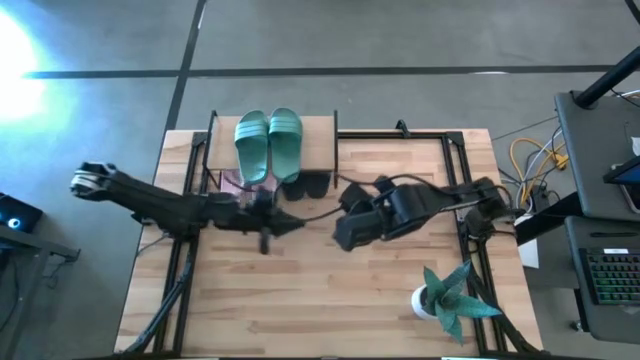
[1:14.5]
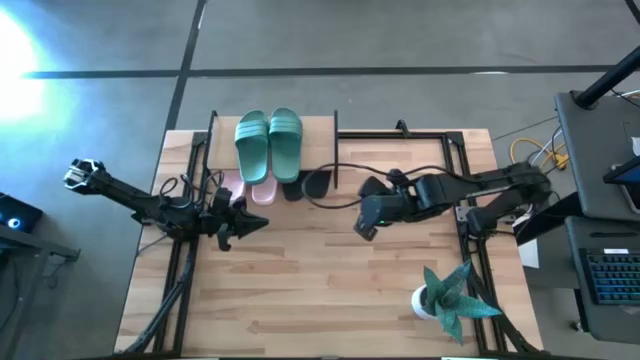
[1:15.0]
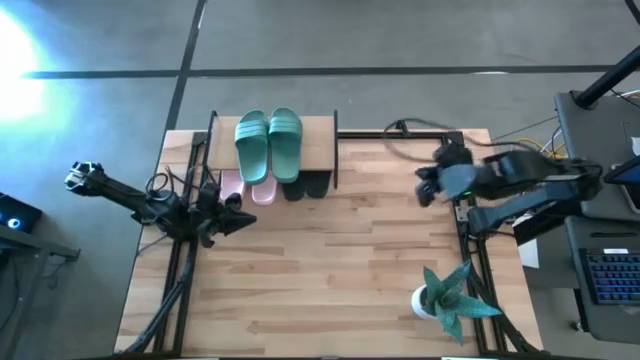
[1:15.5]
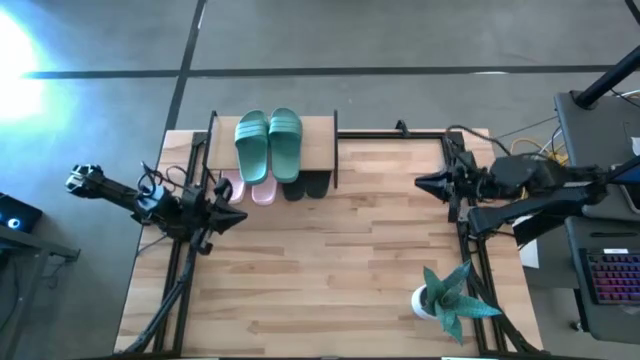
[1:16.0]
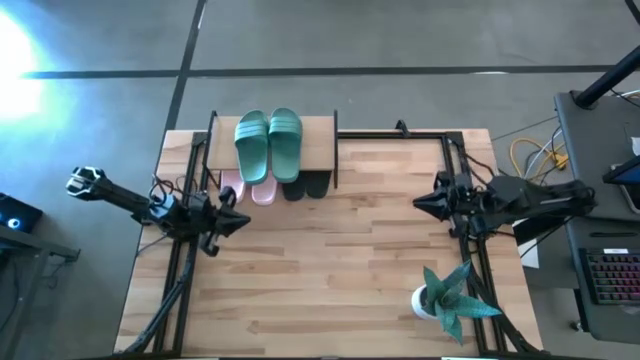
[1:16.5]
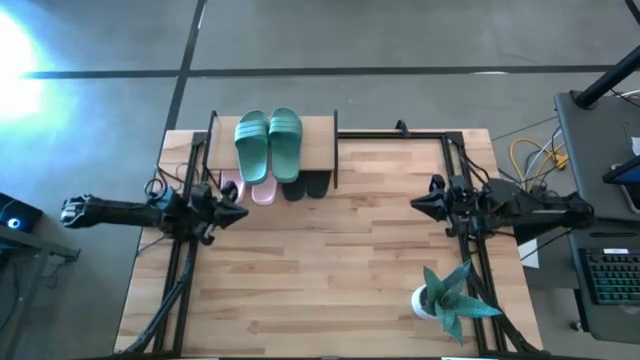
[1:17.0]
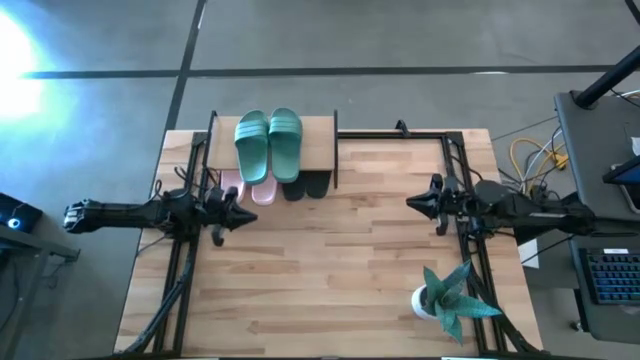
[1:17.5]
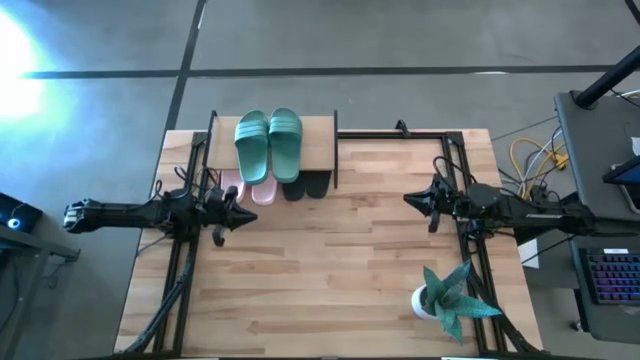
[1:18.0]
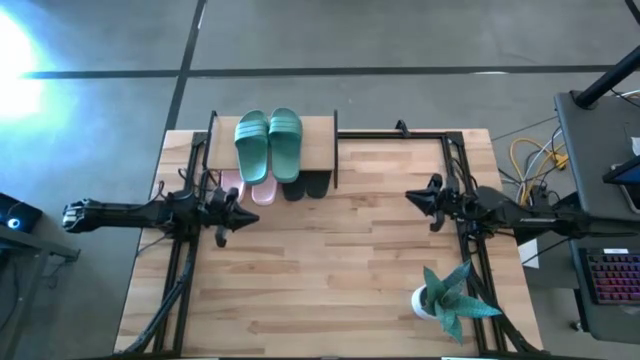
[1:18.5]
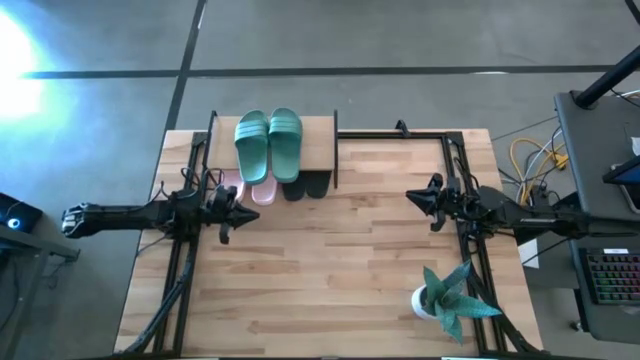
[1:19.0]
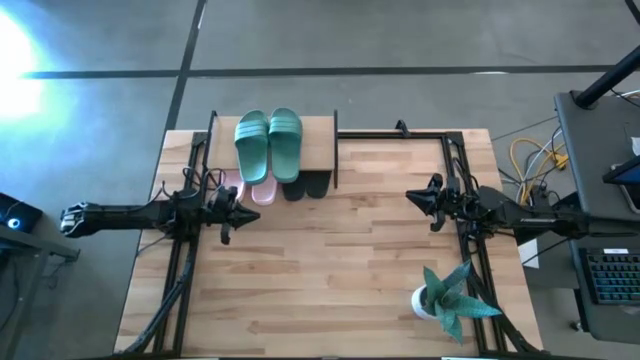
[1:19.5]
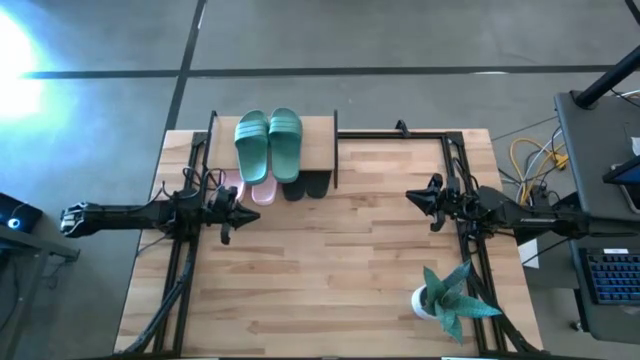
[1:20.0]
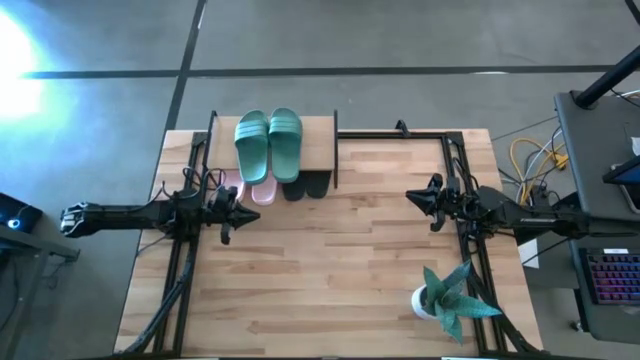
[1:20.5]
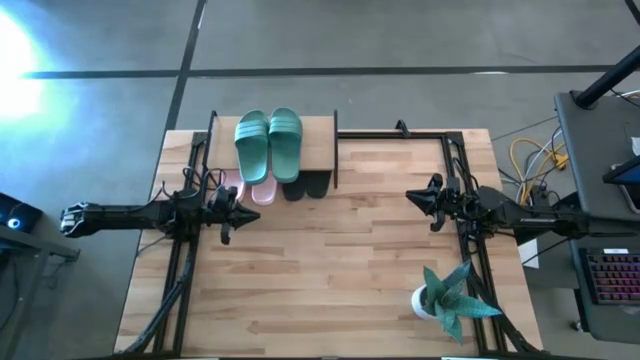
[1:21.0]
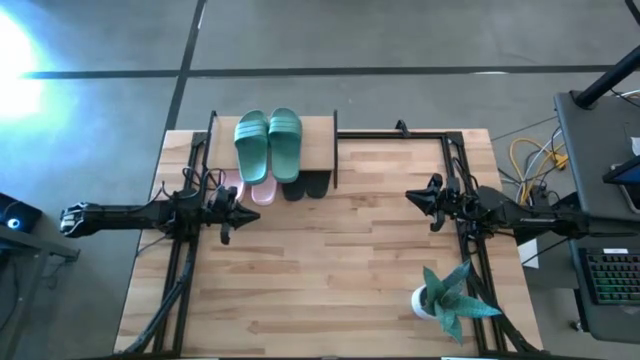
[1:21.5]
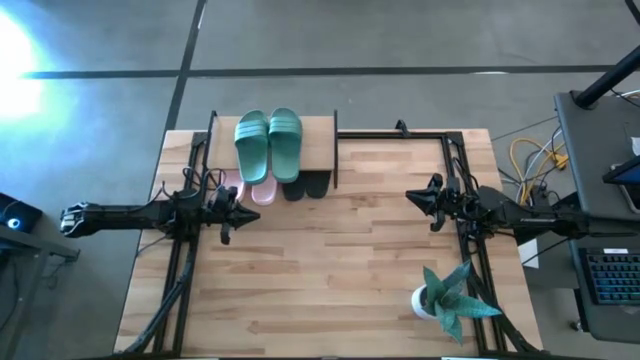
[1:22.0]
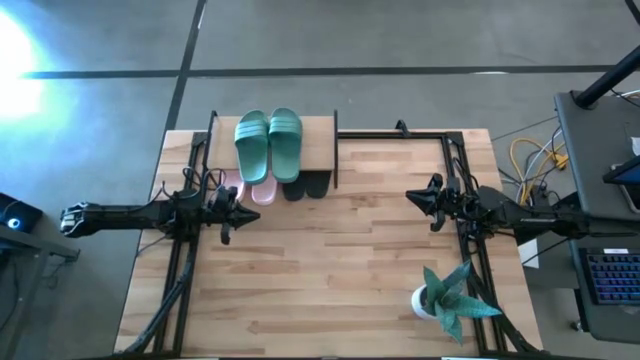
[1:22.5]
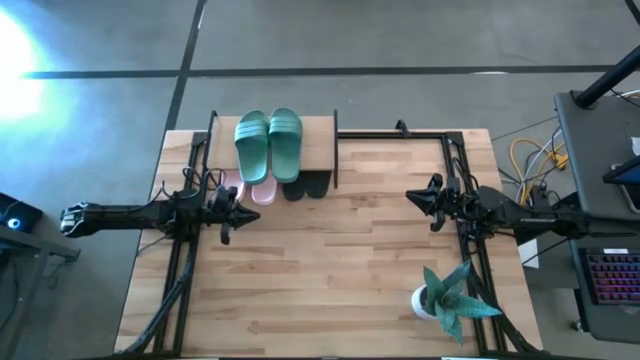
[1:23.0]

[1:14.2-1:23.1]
Task: Pick and place slides into the shelf
Return to Home Position

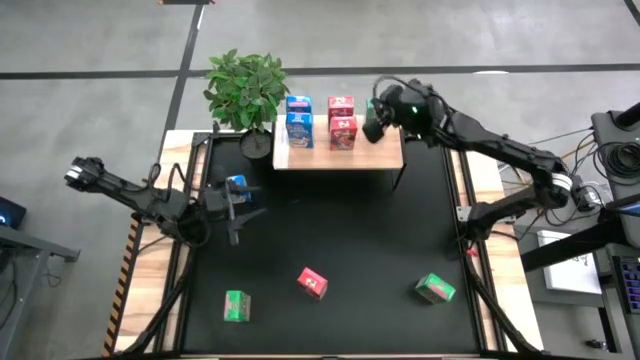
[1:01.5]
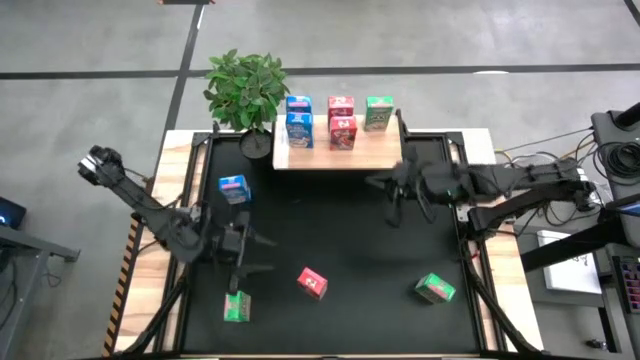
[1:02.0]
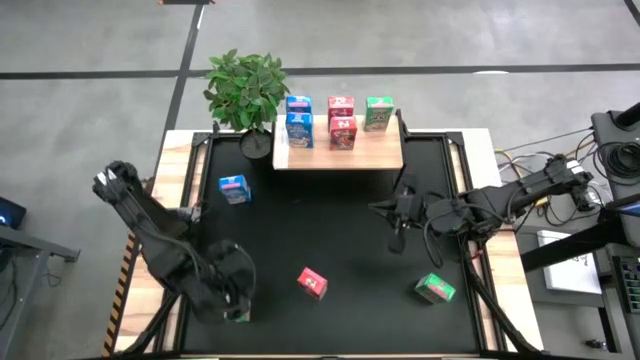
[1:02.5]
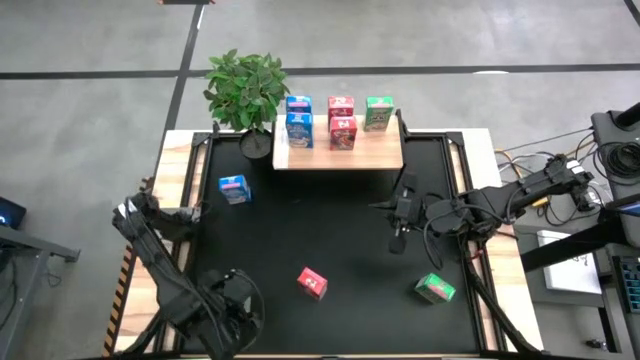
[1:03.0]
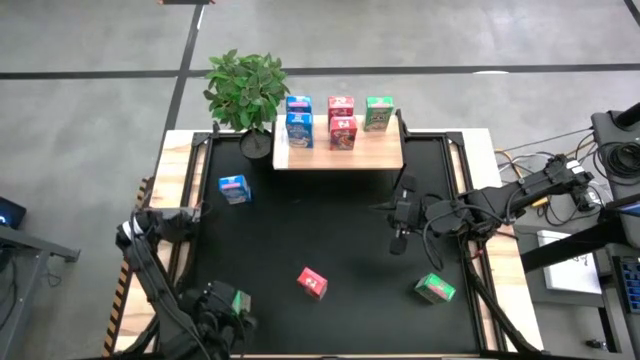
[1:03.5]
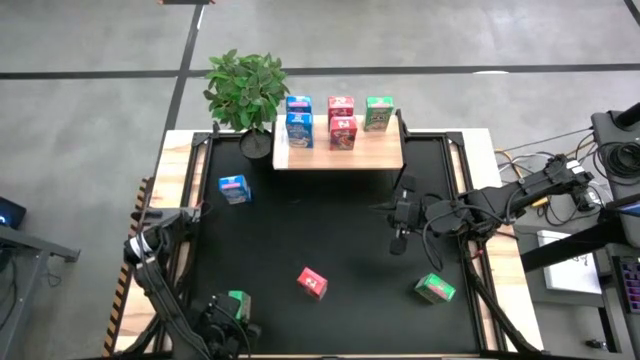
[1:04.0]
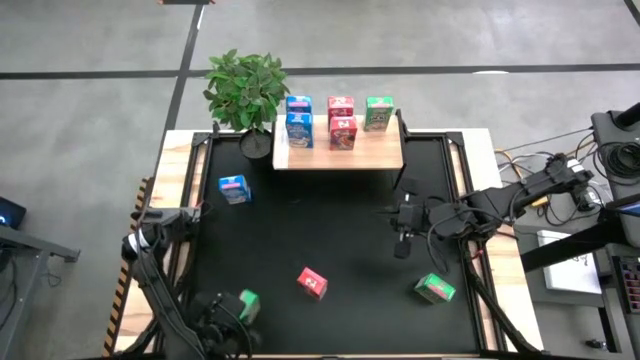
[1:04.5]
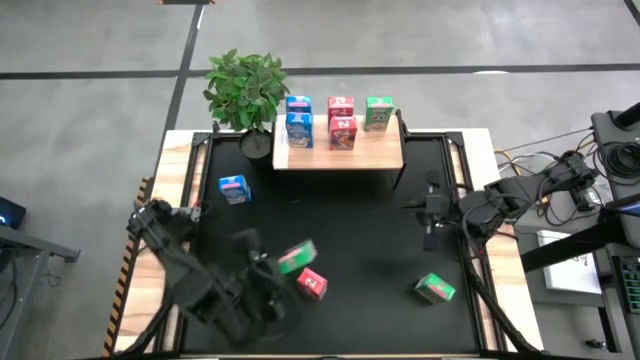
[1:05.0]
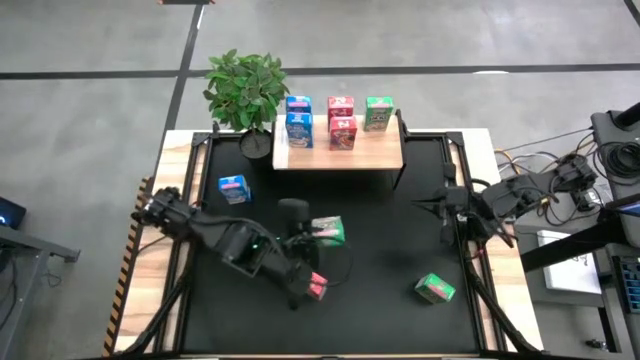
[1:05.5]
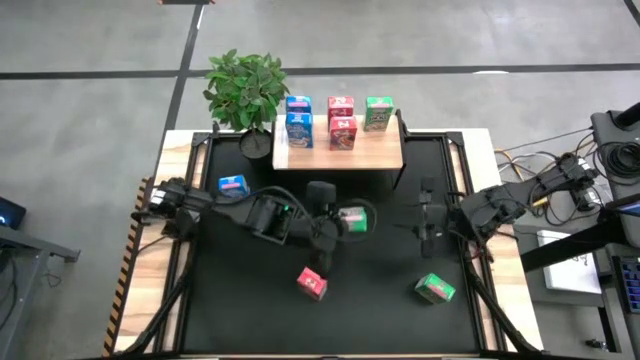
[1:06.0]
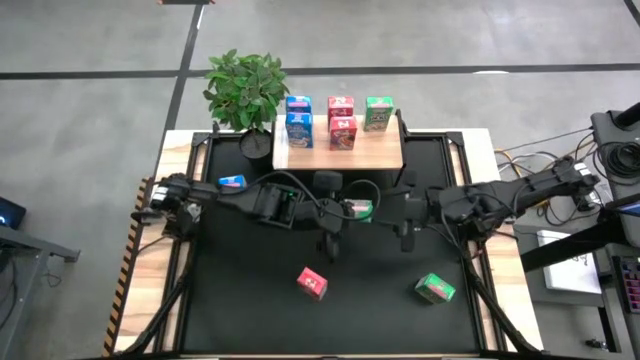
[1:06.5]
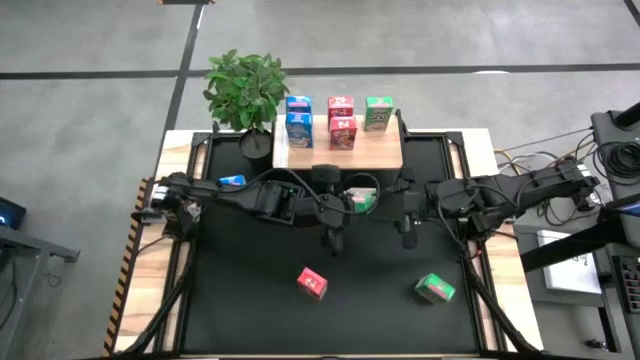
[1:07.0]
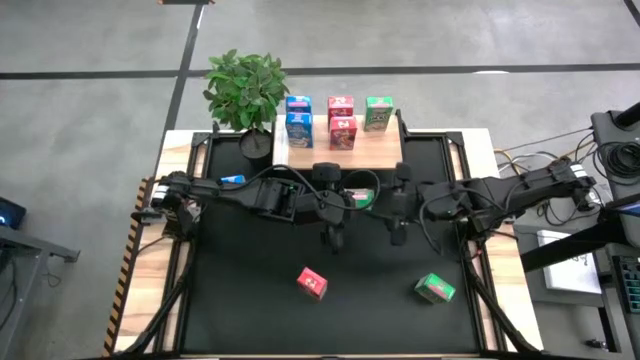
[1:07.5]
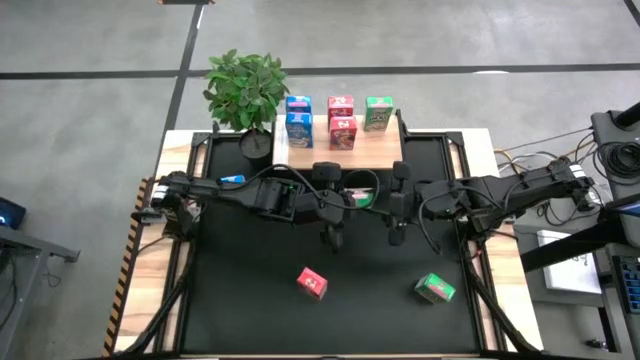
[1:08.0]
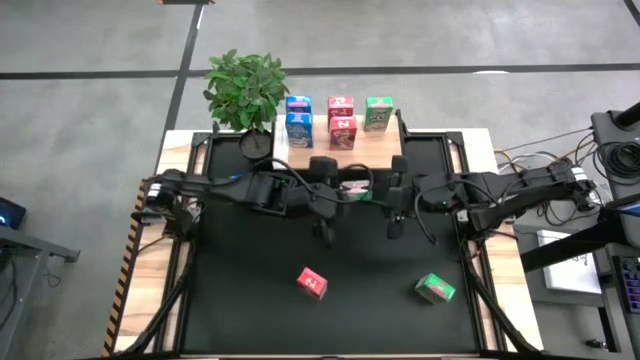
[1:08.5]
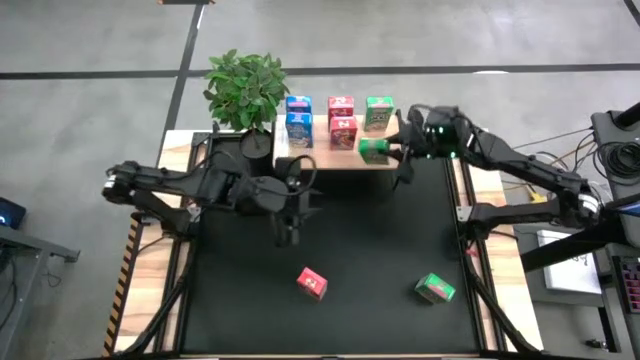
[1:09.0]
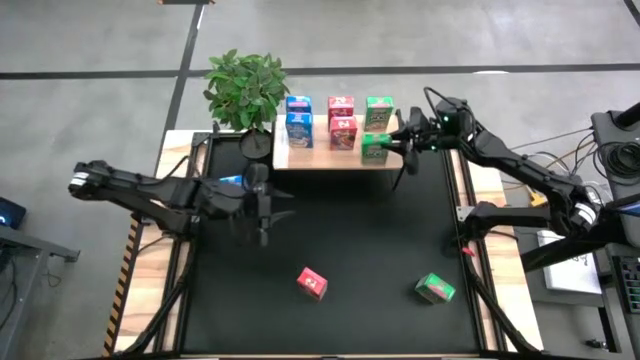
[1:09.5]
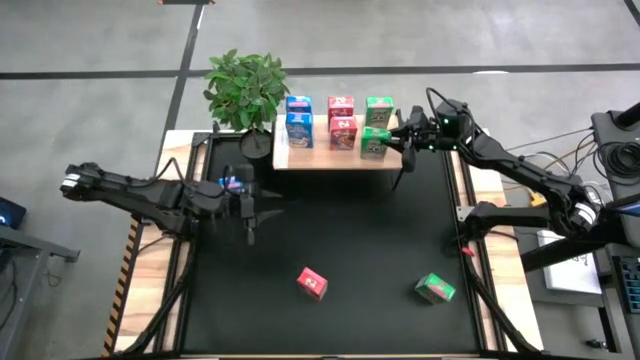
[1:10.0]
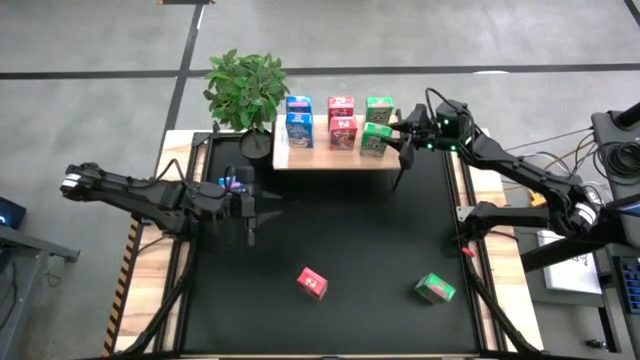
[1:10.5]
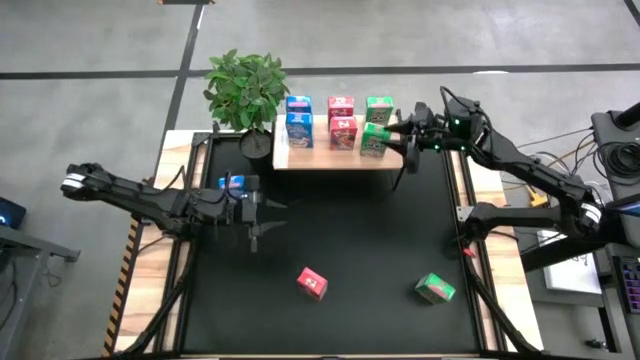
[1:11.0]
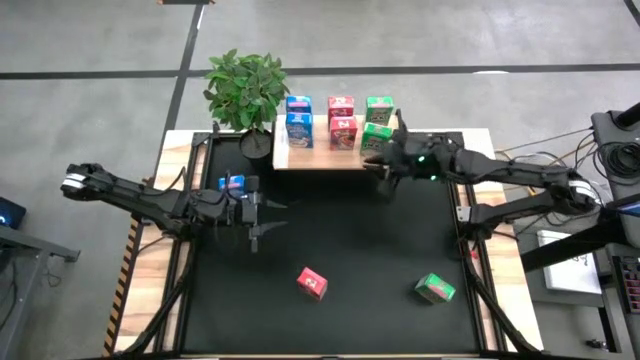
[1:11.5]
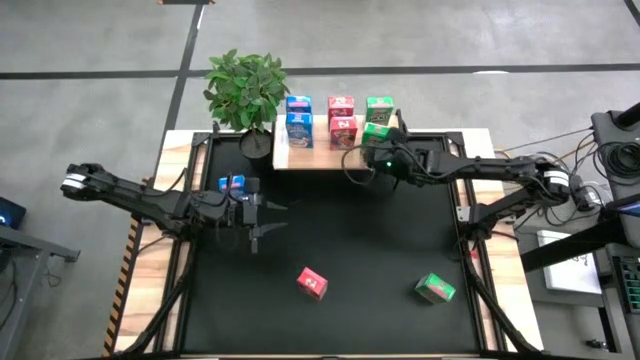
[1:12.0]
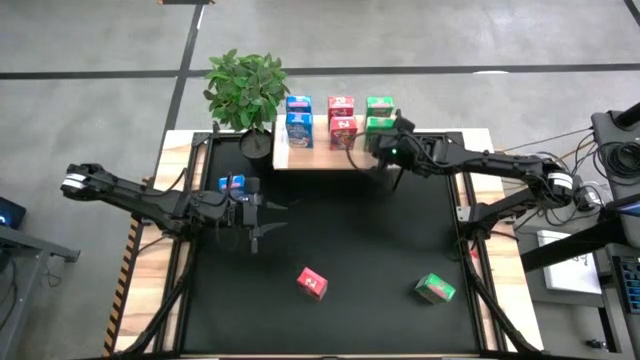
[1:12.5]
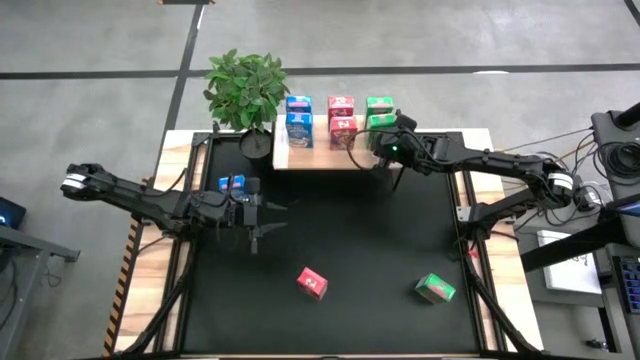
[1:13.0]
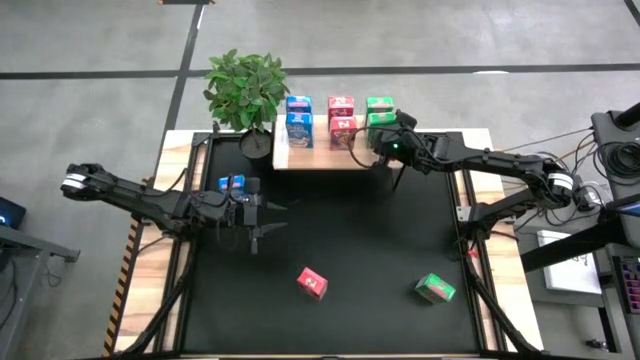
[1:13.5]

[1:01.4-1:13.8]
Task: Stack cereal on shelf
Put the left green cereal box aligned with the other green cereal box on the shelf
